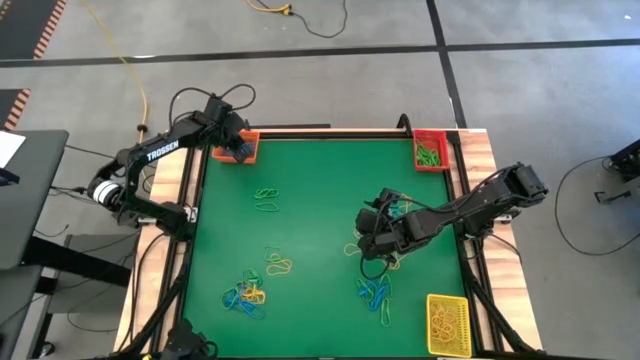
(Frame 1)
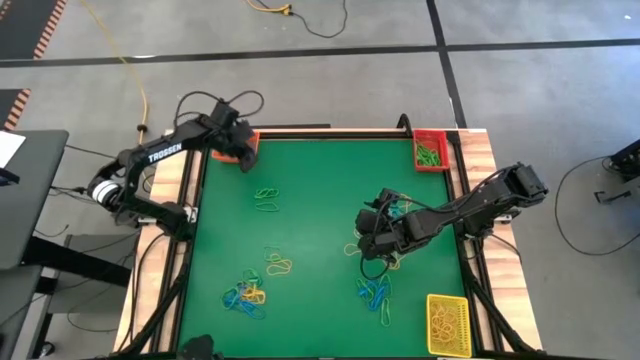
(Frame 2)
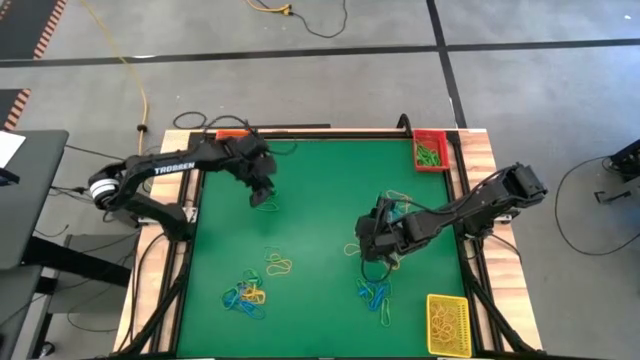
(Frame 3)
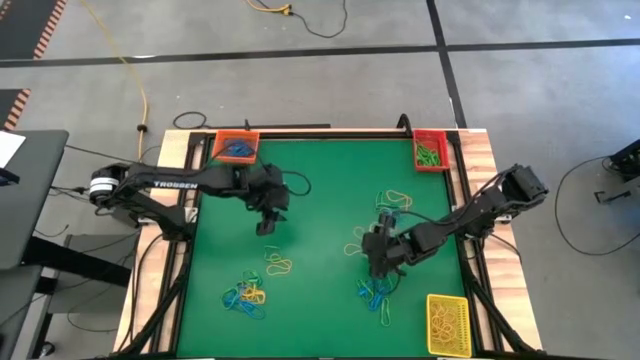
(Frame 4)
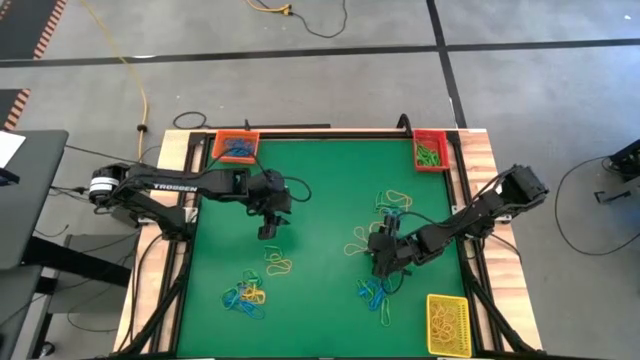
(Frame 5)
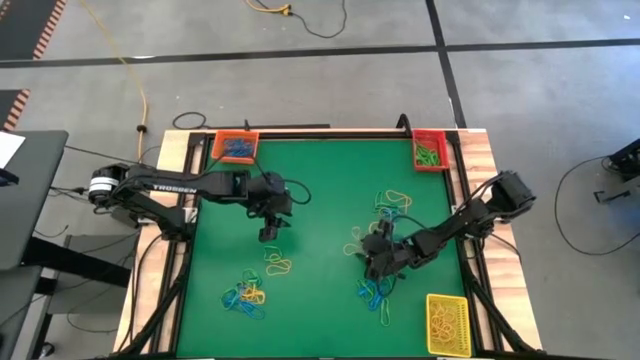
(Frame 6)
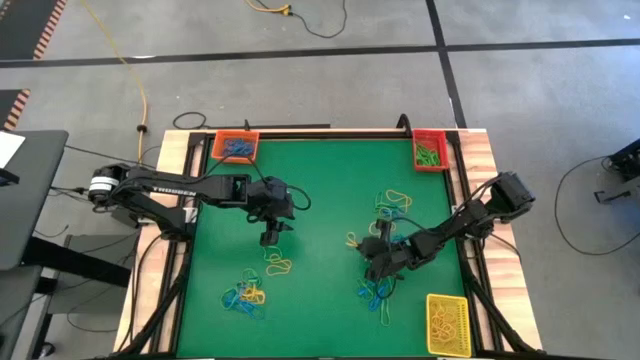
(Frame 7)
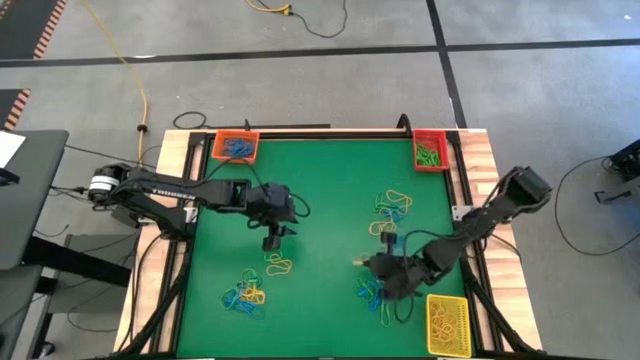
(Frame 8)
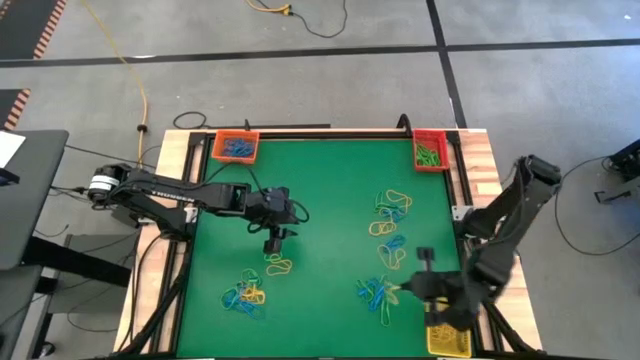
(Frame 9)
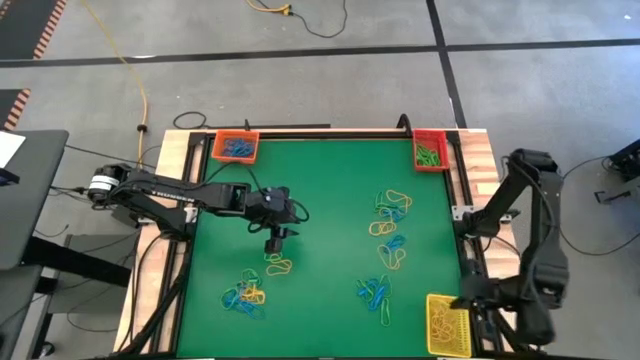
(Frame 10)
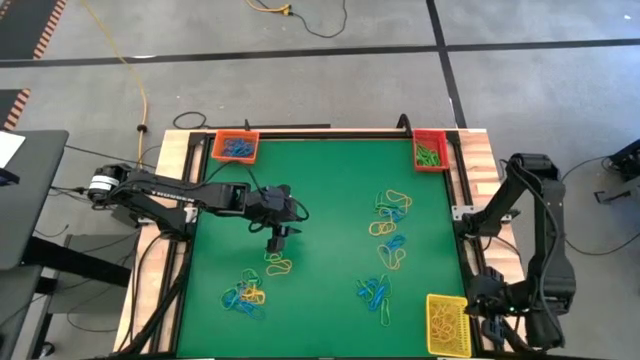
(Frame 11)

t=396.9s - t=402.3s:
Task: Sort rubber bands into baskets
Put the top right yellow rubber band into the yellow bin

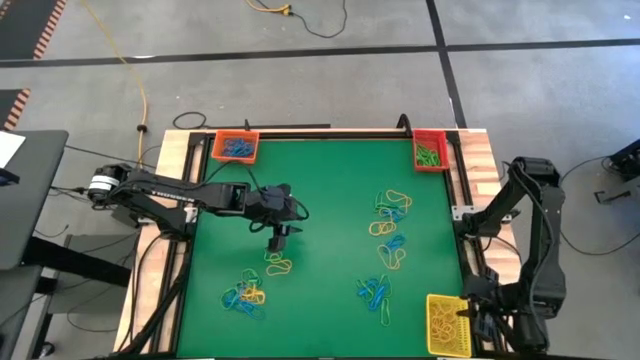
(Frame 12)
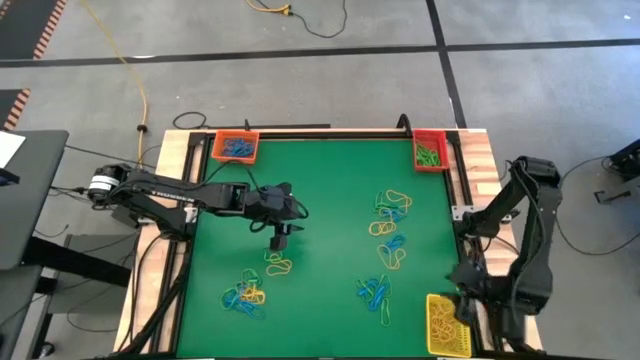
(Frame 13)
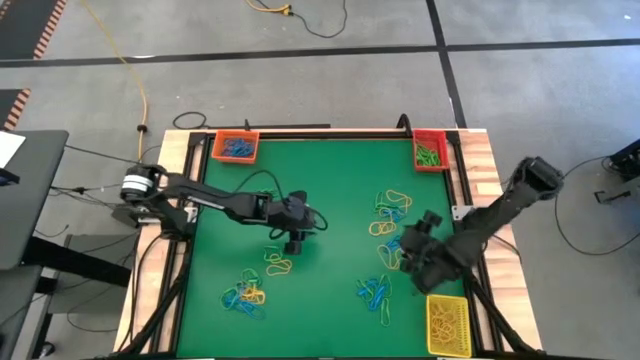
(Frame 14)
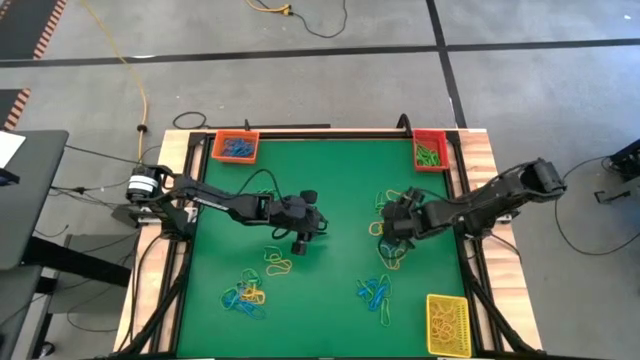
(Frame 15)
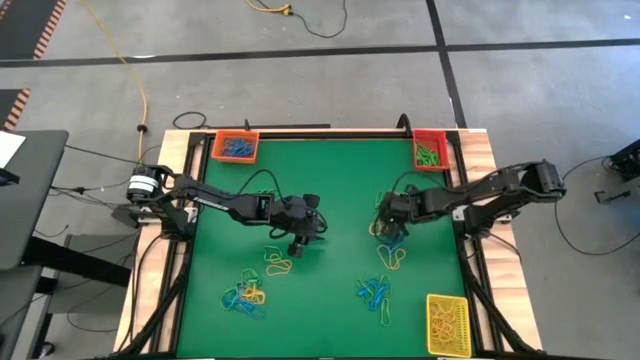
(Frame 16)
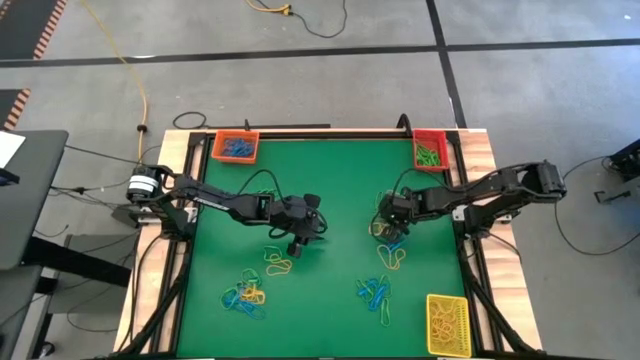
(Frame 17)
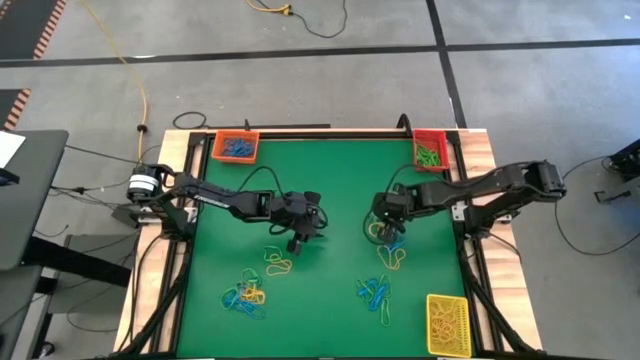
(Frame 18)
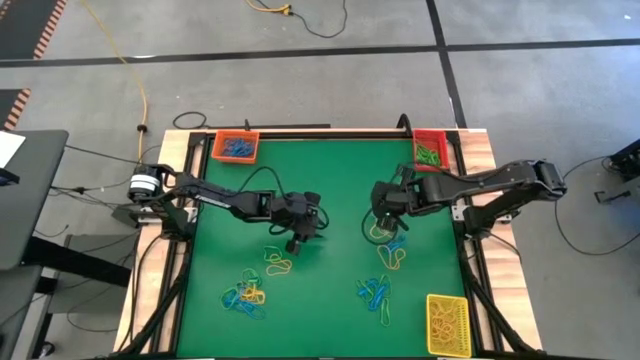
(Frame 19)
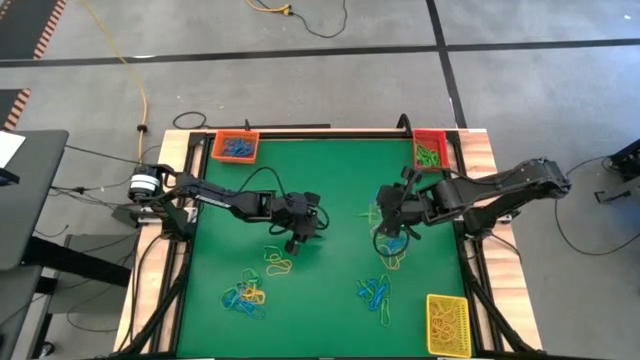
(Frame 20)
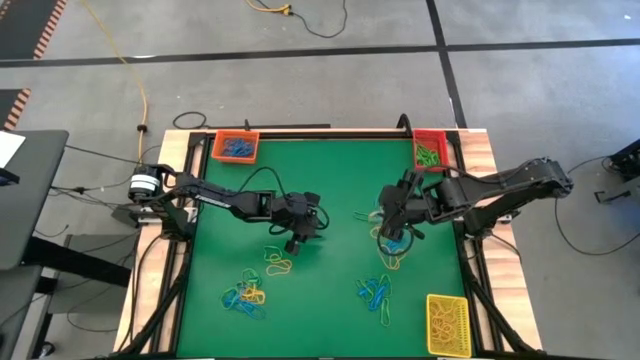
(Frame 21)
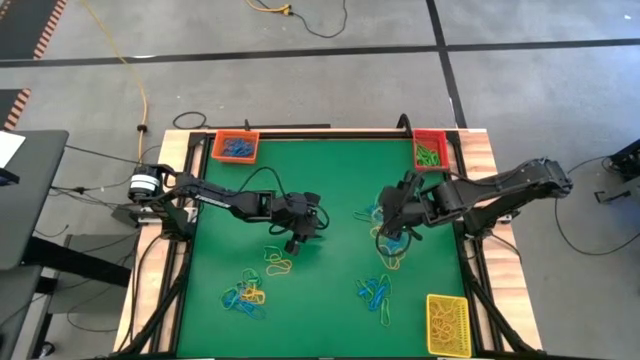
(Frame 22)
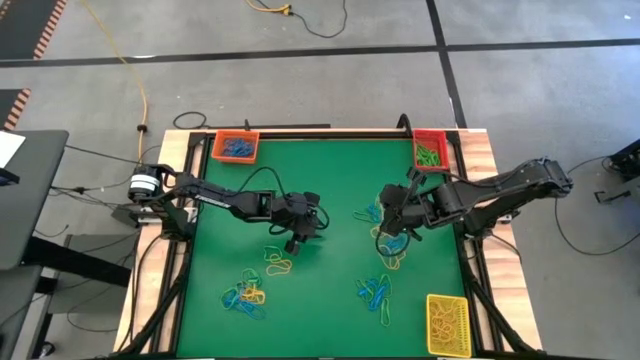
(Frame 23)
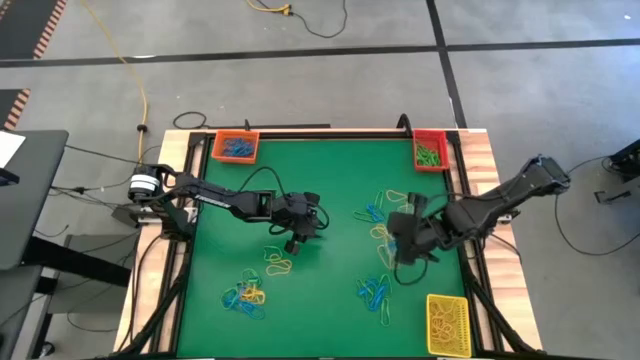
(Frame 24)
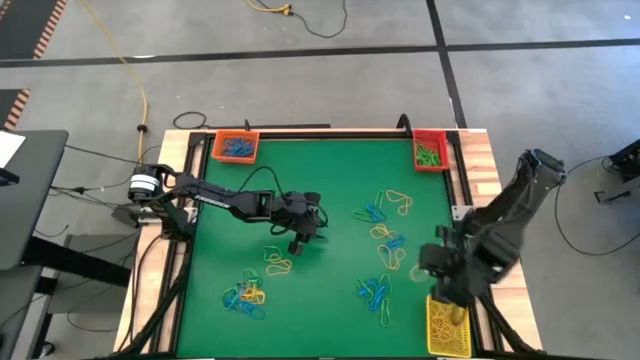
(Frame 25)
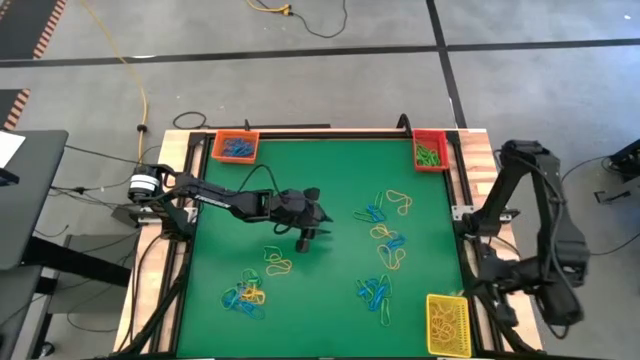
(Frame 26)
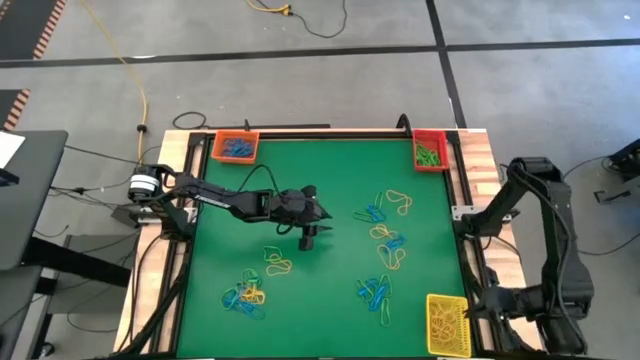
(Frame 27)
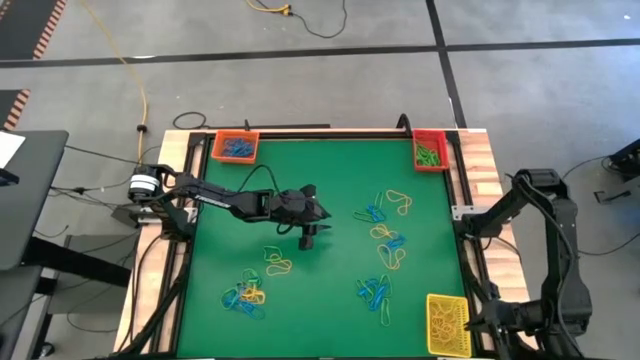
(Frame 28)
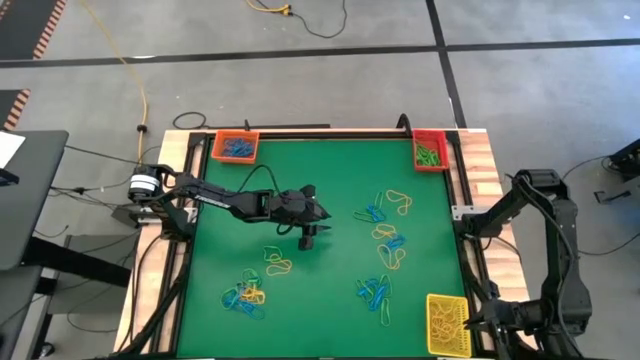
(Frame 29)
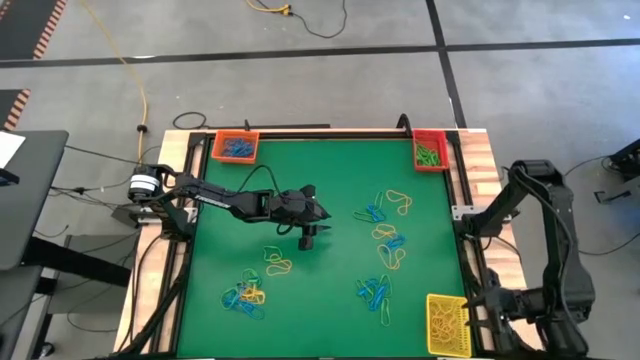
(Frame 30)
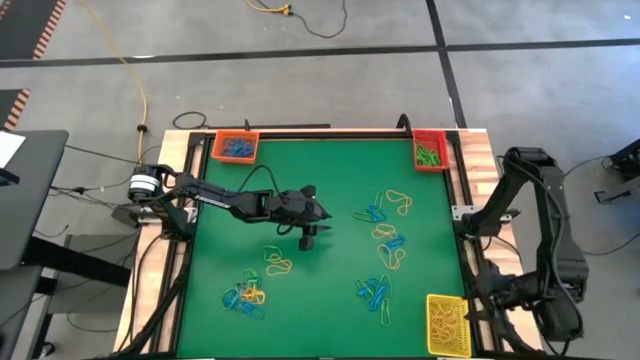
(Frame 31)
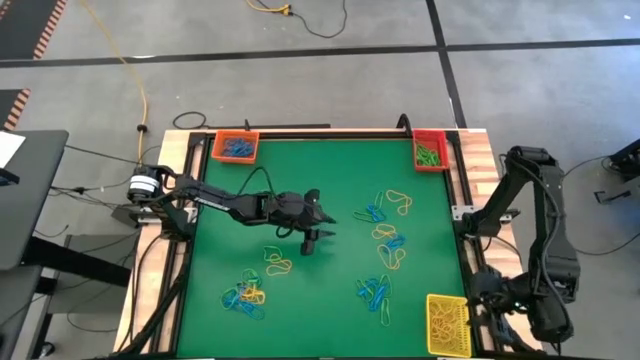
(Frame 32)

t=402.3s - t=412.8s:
Put the top right yellow rubber band into the yellow bin
